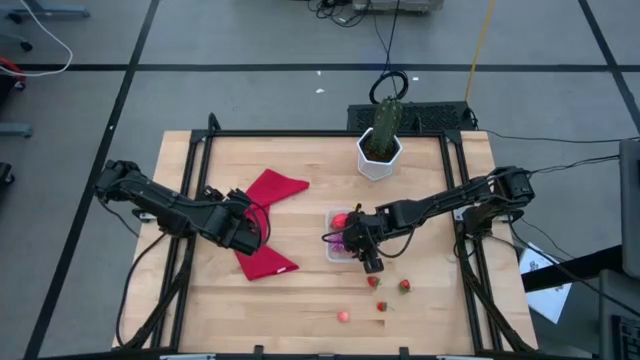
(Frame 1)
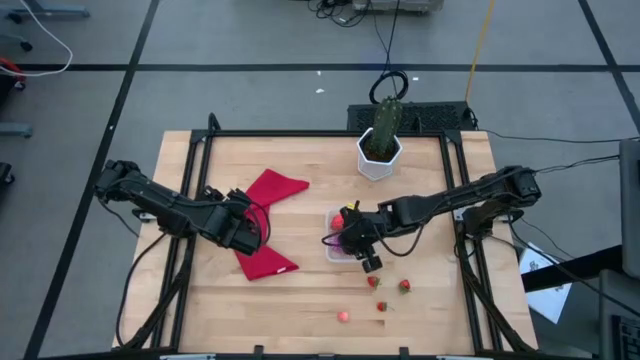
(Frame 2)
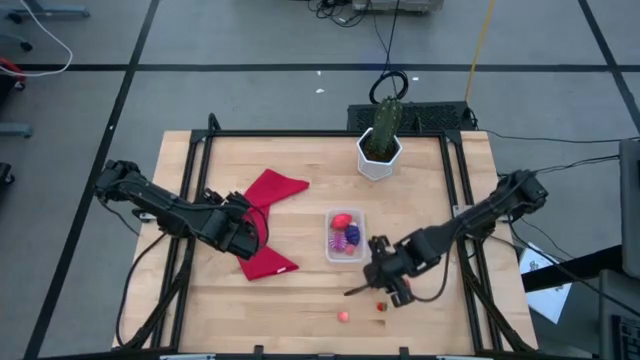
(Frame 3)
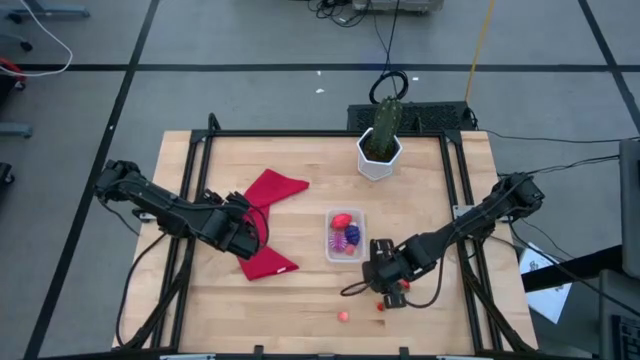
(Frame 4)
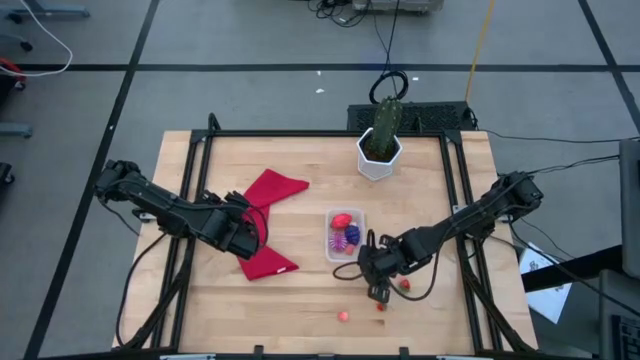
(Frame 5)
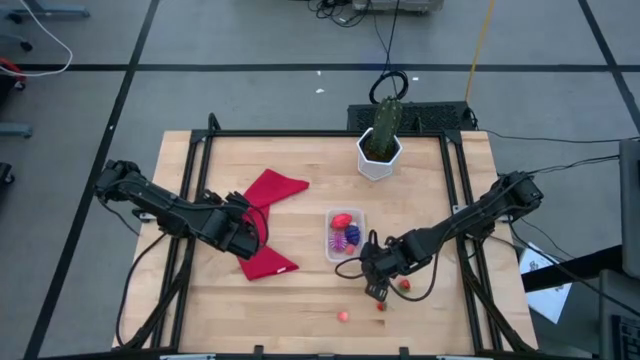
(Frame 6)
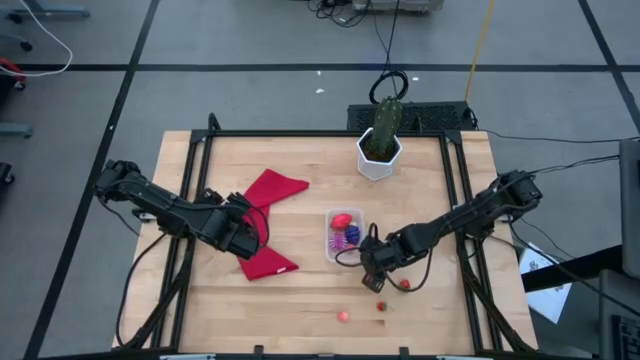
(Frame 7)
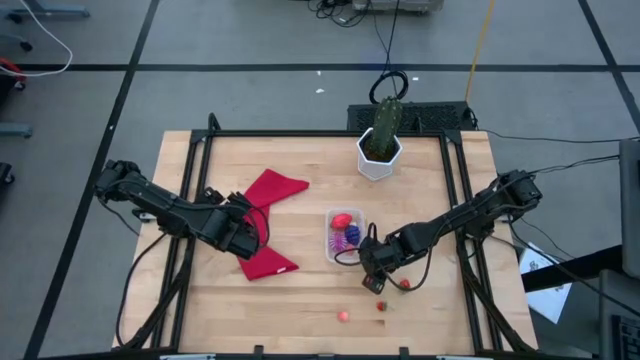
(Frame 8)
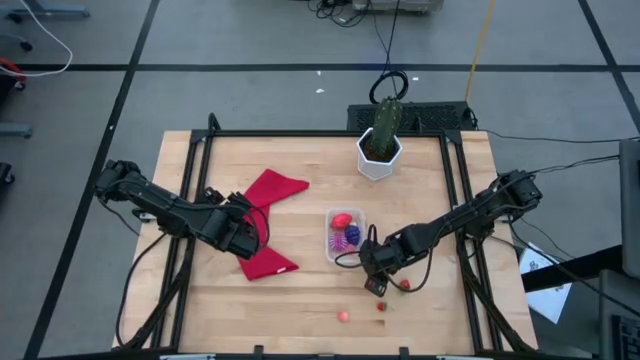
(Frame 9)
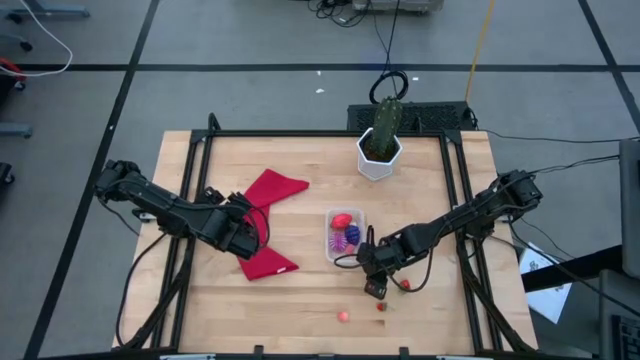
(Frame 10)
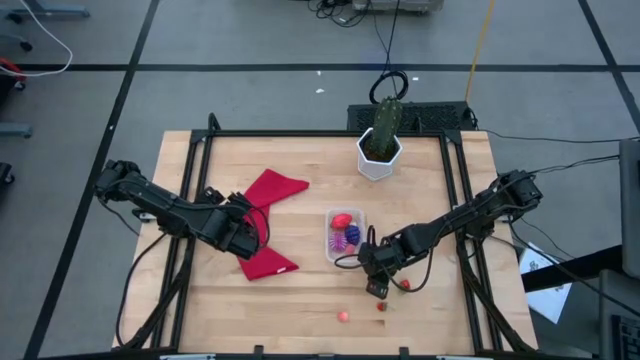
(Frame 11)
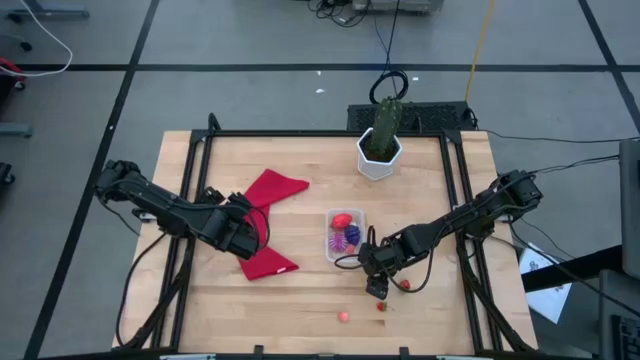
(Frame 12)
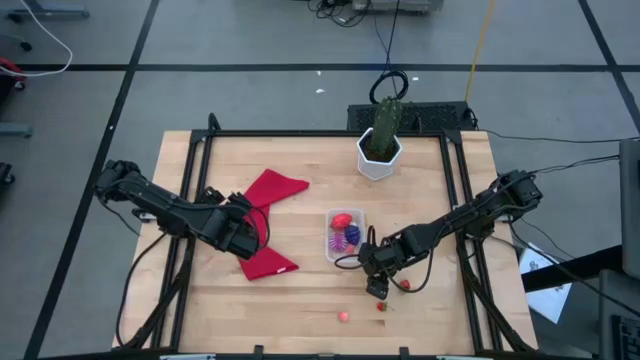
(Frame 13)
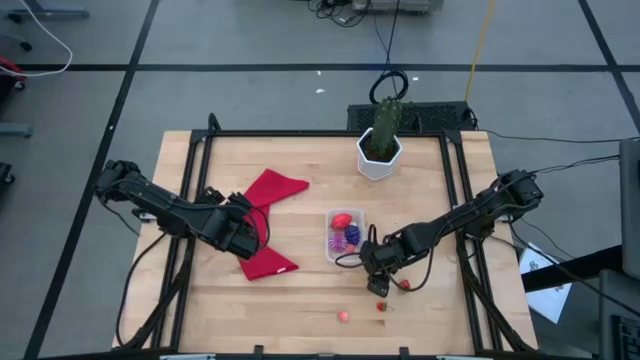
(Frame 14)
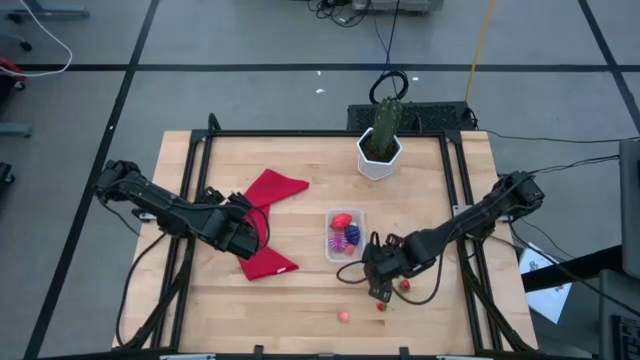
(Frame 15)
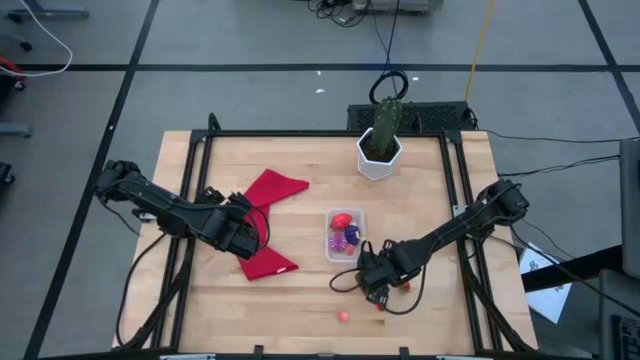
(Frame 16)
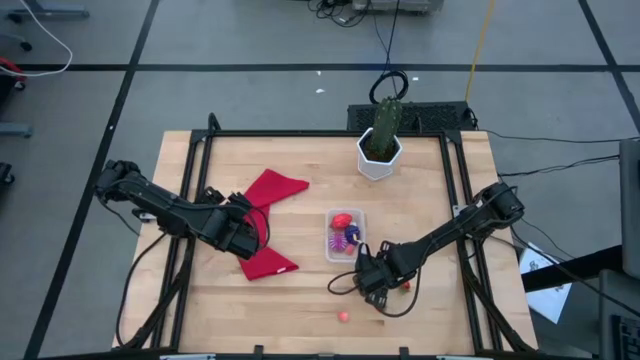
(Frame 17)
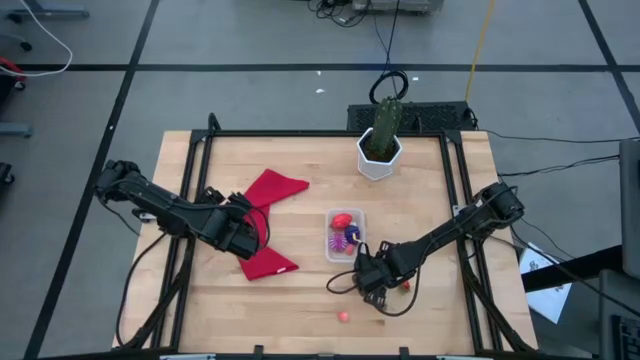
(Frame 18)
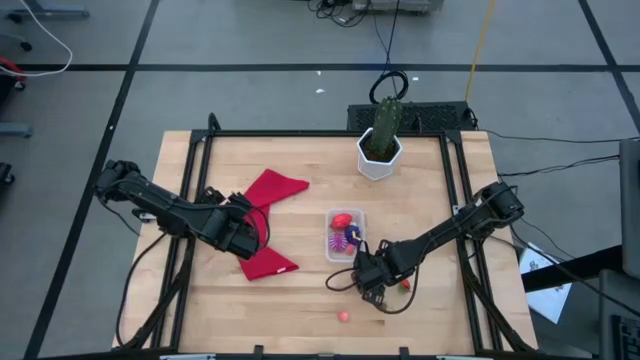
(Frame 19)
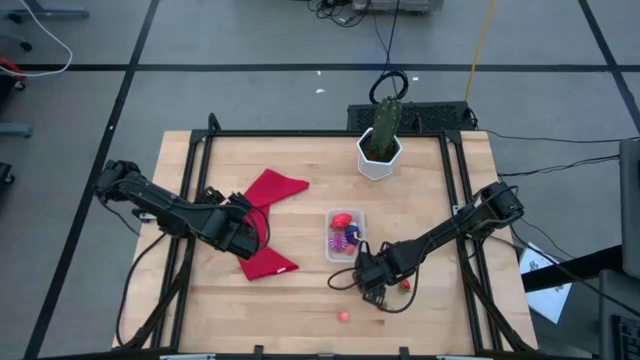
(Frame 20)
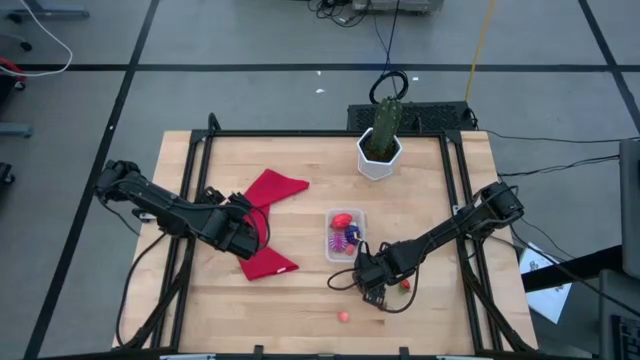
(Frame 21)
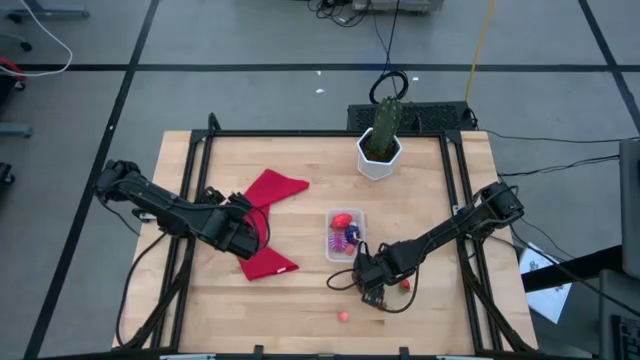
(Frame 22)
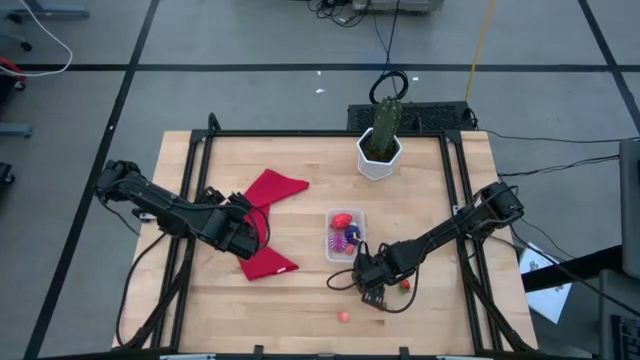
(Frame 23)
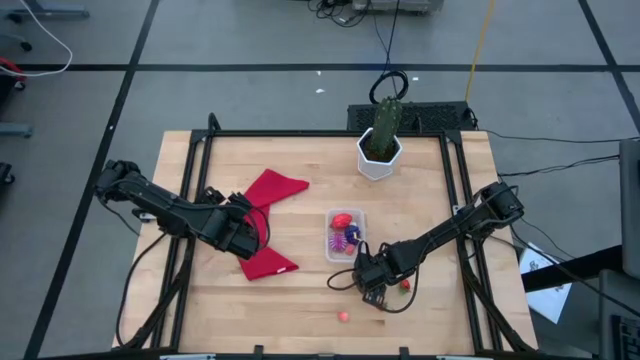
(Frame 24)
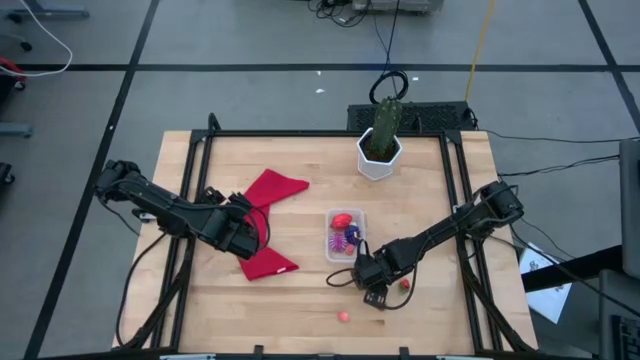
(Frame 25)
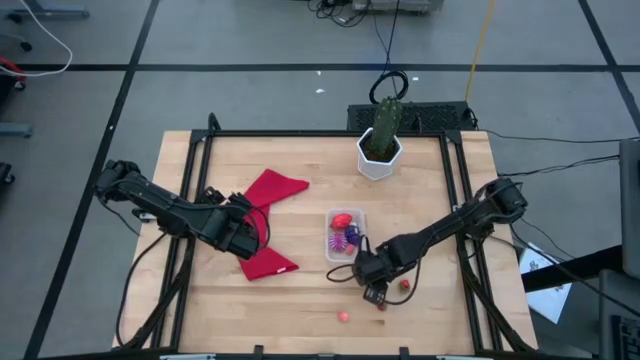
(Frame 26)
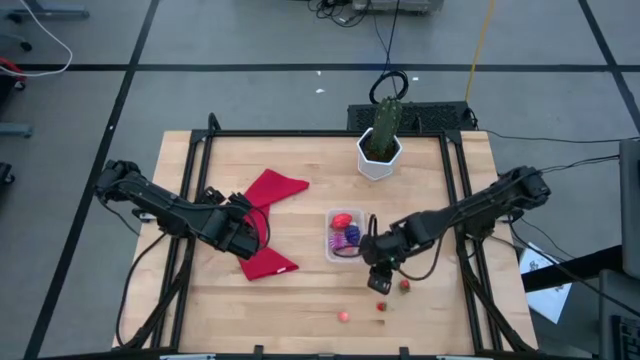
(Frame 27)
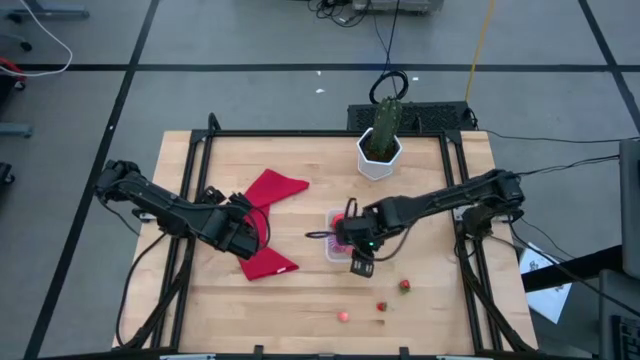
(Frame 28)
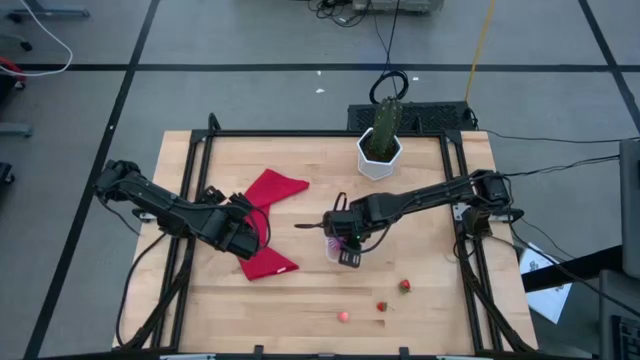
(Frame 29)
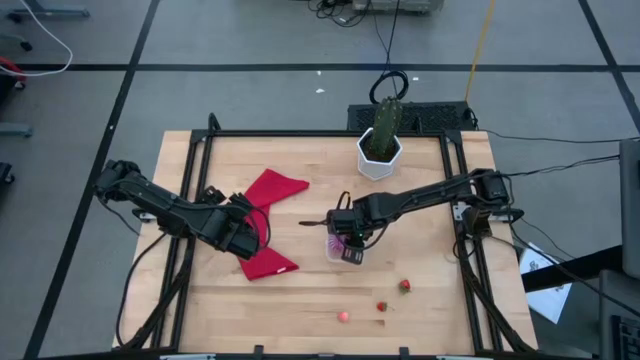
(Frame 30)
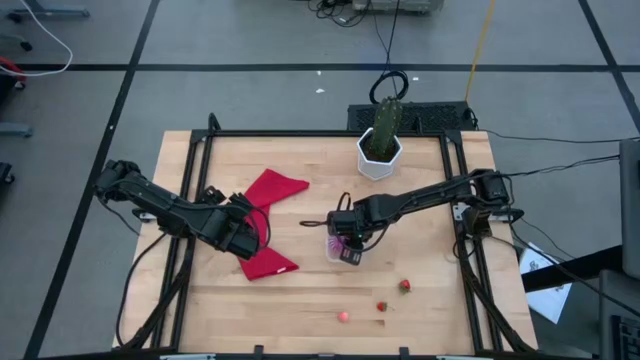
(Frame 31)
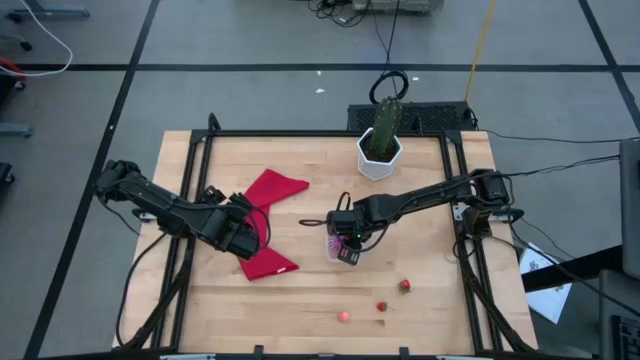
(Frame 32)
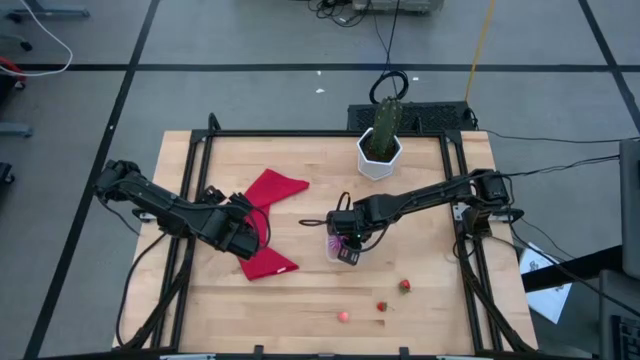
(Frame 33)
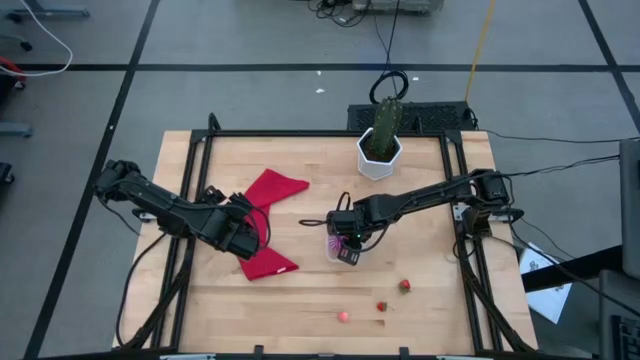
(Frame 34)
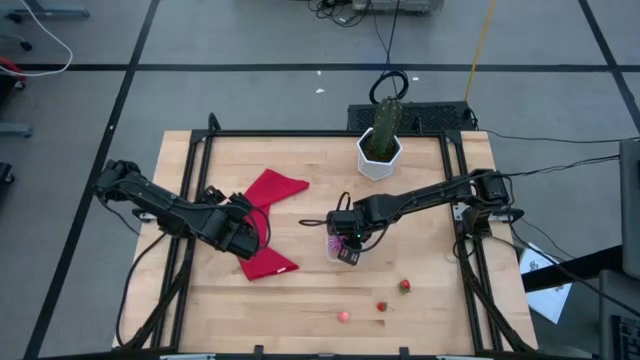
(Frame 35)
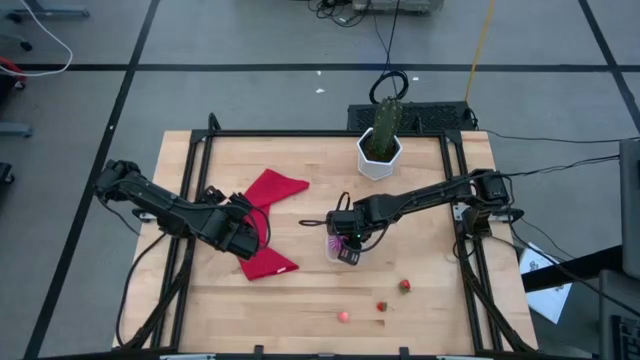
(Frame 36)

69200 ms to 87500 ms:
Task: Pick and placing Produce into tupperware
Put the top left red strawberry into the transparent bin

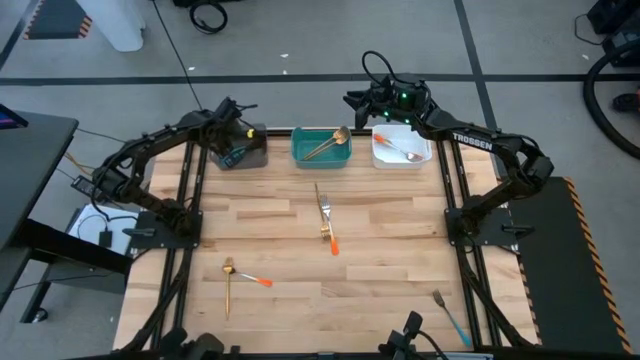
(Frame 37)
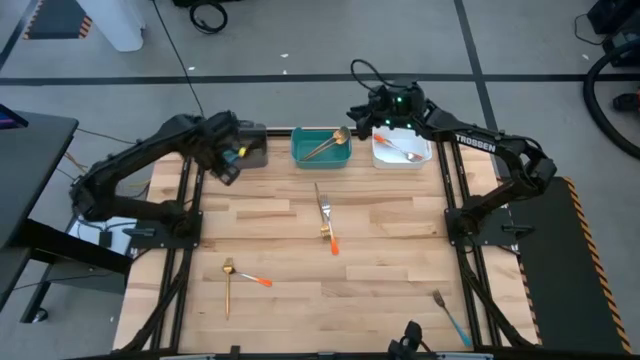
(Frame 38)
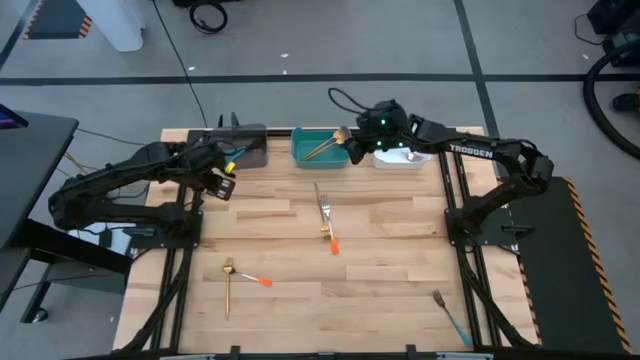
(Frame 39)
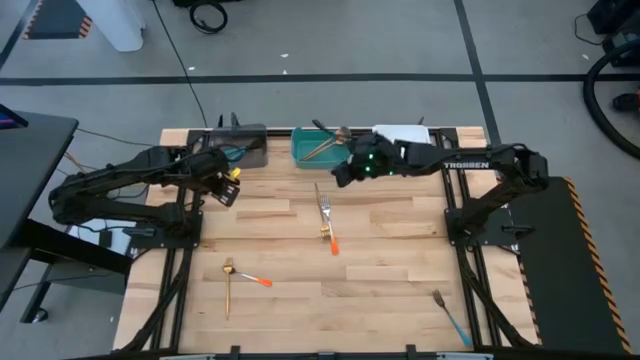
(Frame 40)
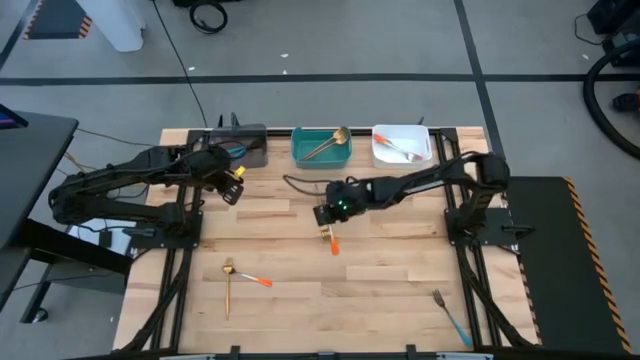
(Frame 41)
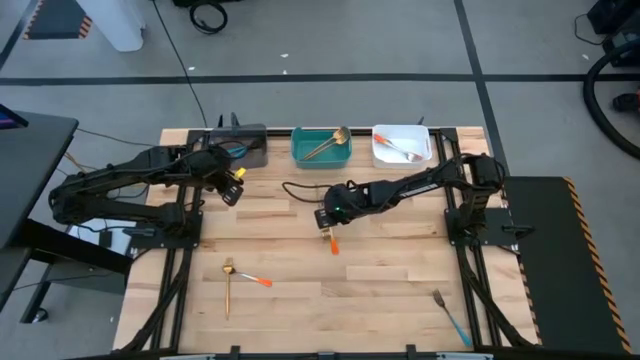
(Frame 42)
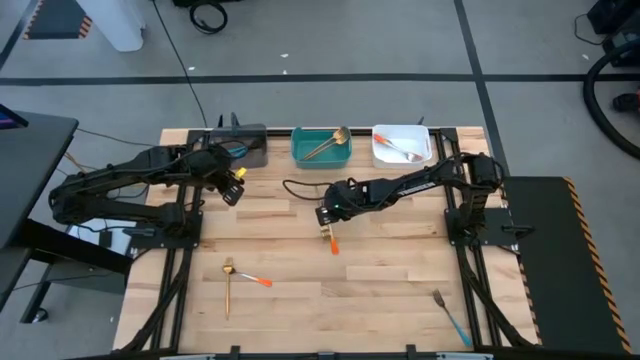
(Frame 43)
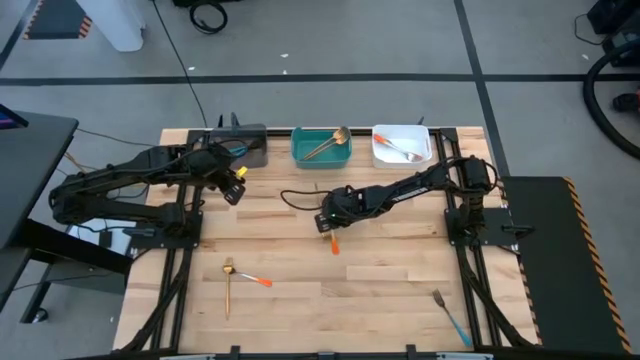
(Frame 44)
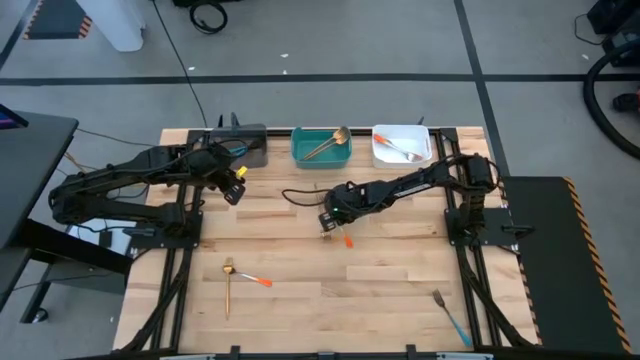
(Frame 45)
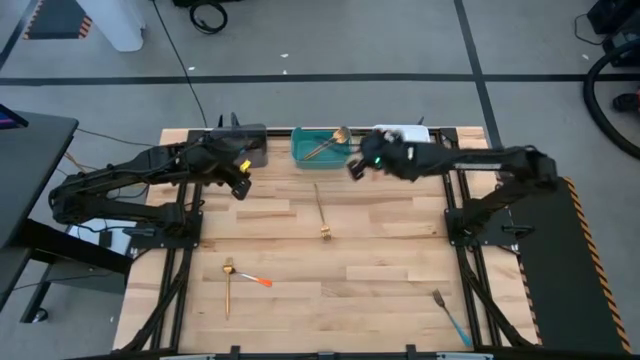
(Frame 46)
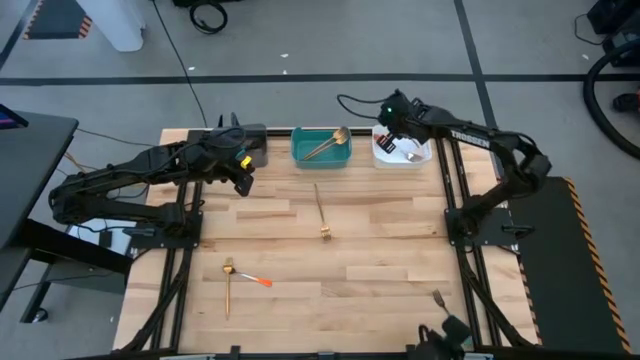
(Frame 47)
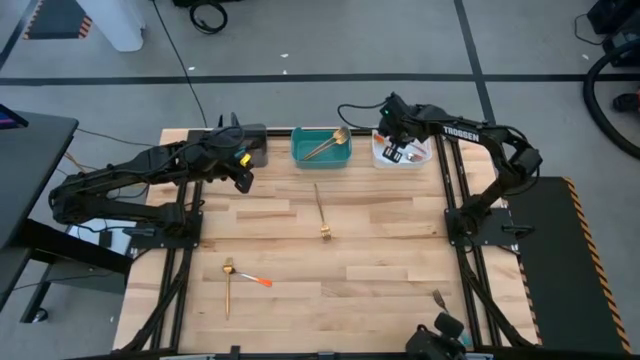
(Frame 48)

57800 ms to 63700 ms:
Task: Sort silverware by color (type)
Put the orange fork into the white bin
